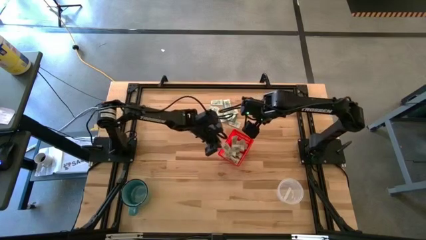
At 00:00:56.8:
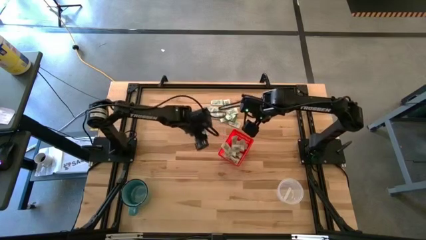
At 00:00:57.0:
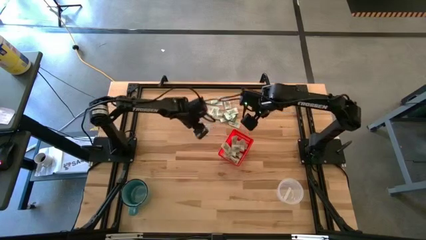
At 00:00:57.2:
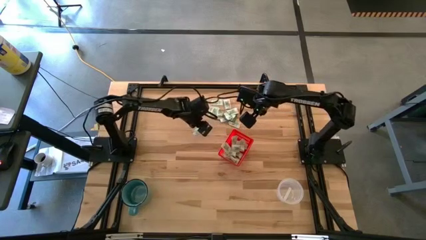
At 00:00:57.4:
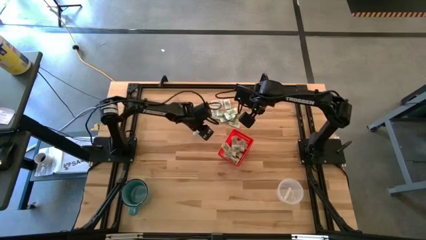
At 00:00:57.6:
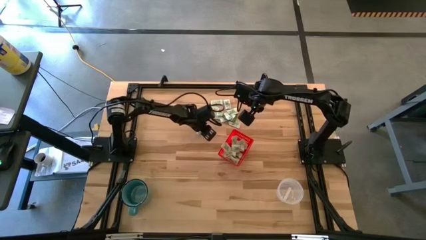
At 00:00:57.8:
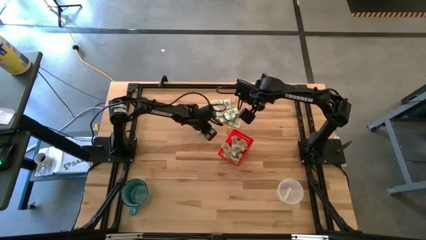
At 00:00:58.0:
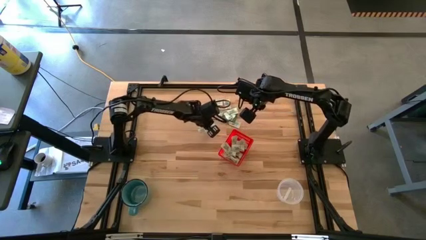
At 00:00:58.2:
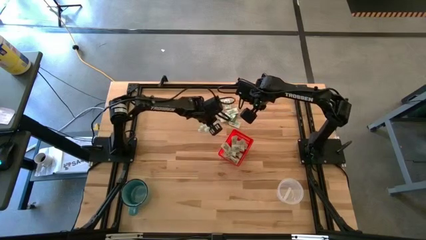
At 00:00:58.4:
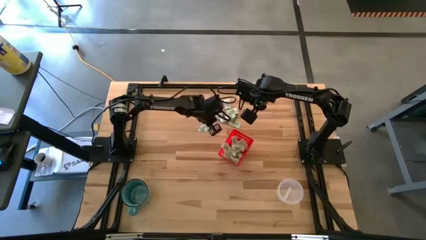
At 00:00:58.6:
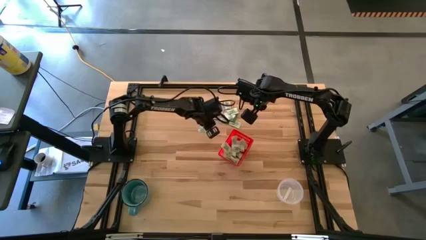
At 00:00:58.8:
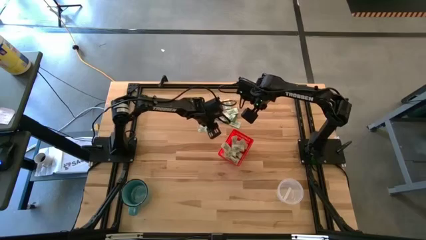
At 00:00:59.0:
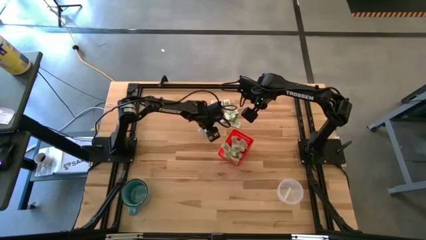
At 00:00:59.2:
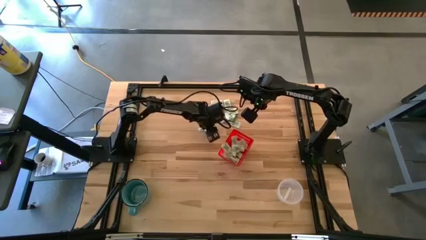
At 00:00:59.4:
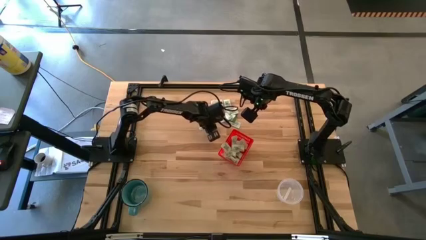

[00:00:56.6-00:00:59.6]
Task: Pick and place items into bin
Put the white stevia packet into the bin

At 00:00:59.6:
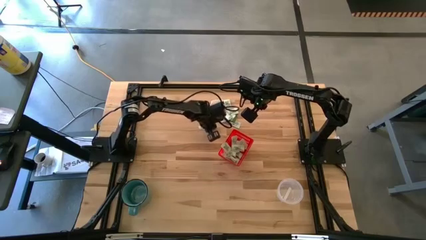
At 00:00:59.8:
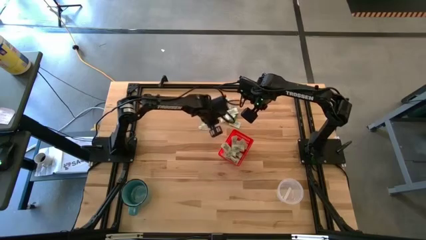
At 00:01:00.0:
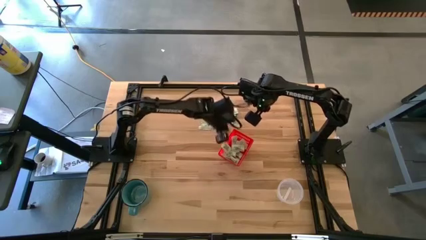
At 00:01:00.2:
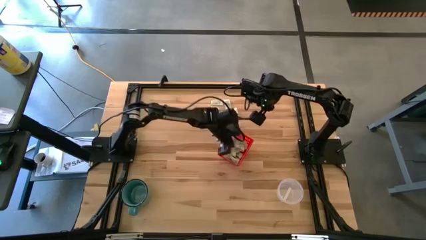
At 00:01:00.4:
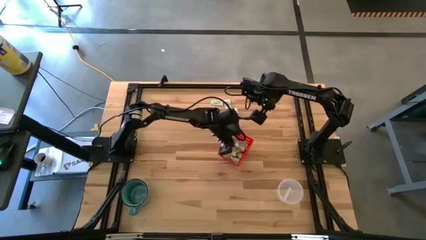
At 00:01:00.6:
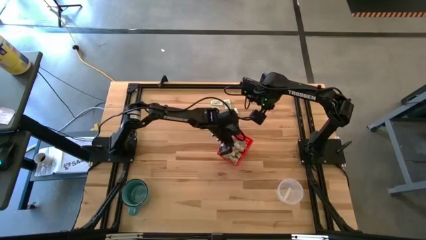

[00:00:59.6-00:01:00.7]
Put the white stevia packet into the bin

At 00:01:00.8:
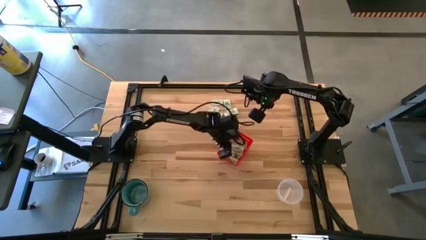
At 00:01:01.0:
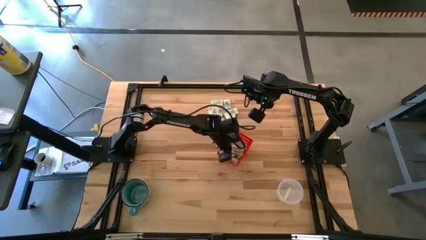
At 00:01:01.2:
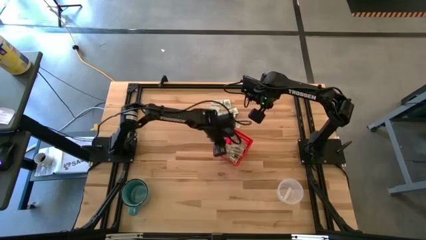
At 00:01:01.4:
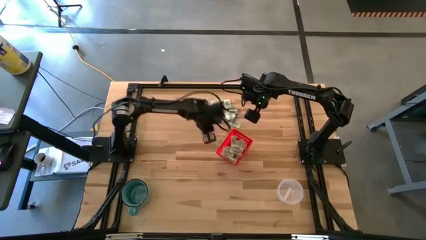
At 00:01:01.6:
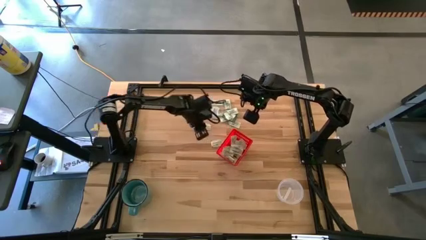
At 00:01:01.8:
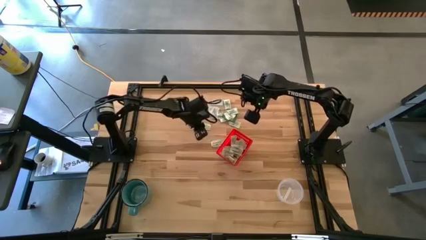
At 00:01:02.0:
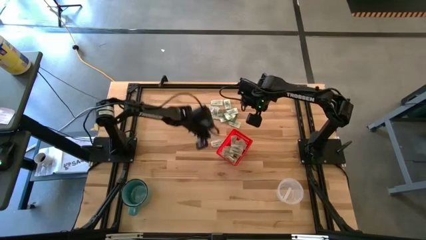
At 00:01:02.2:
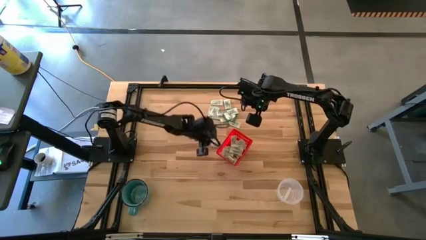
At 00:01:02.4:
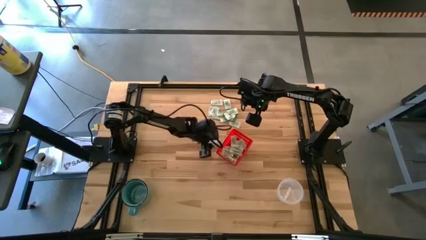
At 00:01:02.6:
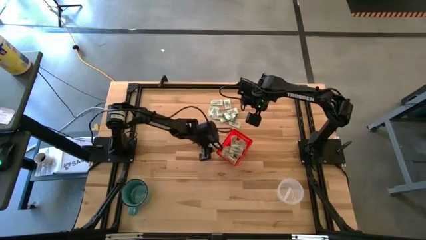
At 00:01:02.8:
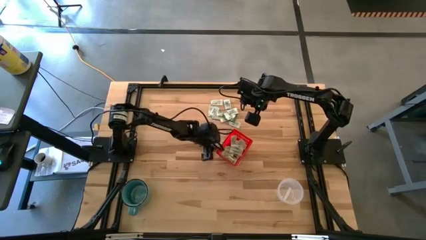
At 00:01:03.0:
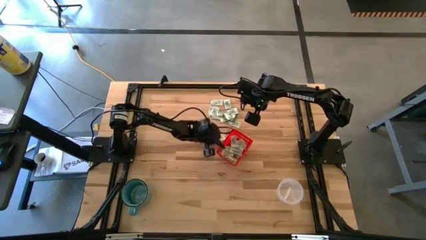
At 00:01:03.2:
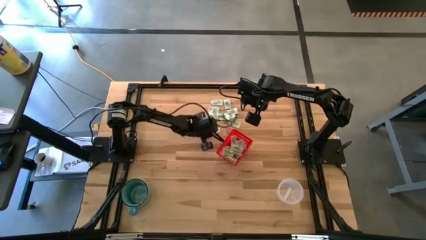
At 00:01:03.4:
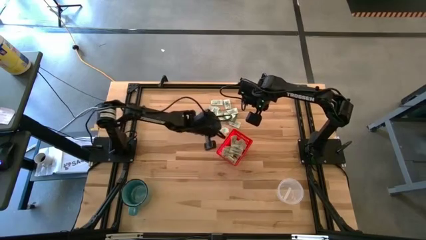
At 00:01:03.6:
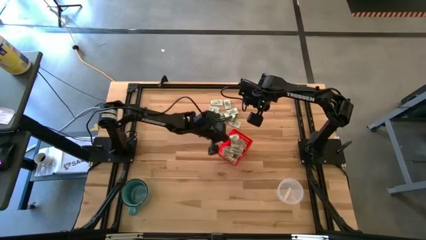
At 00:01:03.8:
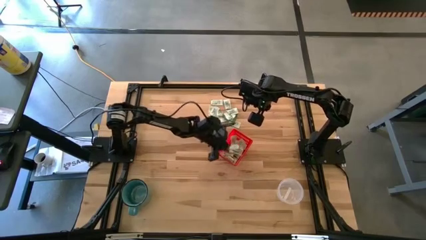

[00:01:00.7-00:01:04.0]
Put the white stevia packet into the bin

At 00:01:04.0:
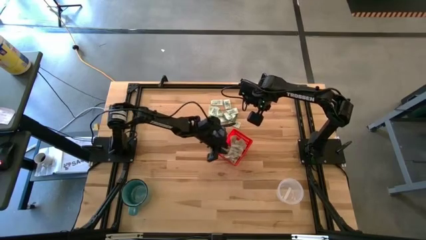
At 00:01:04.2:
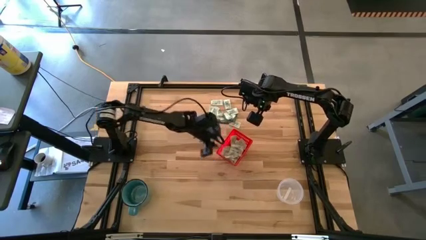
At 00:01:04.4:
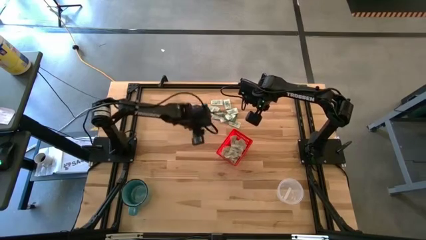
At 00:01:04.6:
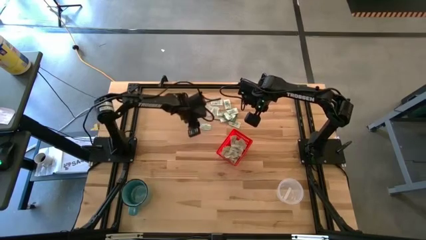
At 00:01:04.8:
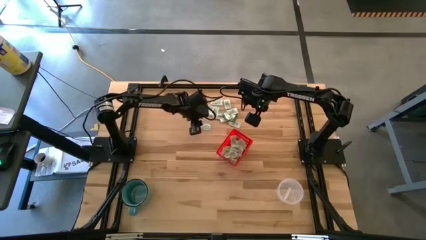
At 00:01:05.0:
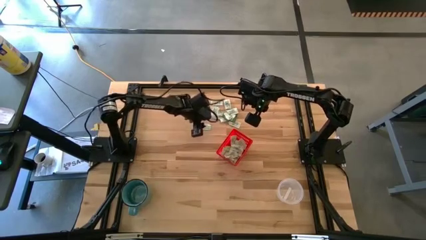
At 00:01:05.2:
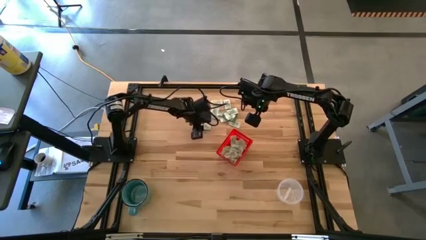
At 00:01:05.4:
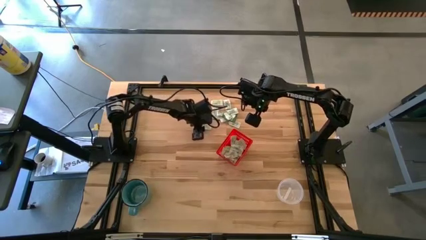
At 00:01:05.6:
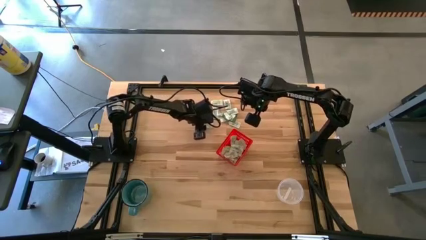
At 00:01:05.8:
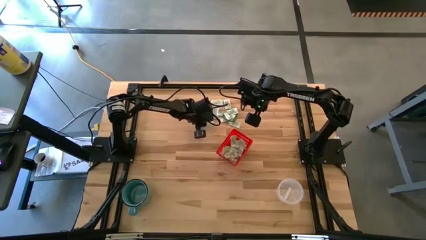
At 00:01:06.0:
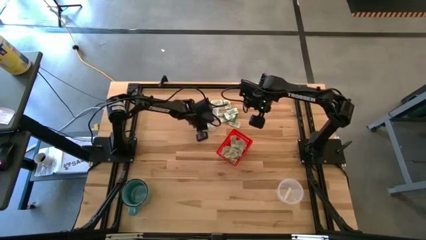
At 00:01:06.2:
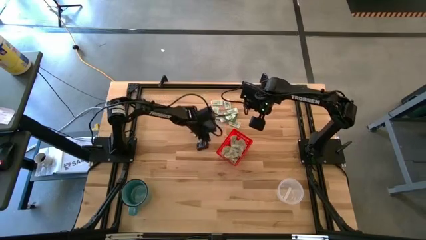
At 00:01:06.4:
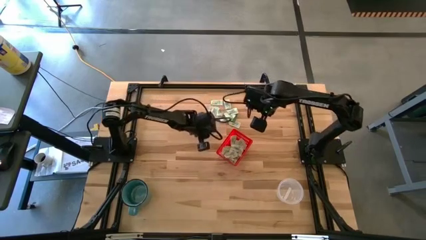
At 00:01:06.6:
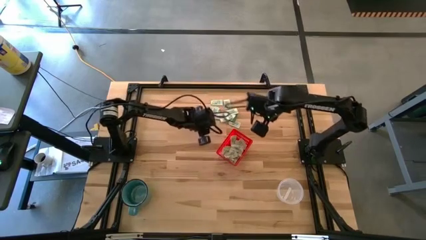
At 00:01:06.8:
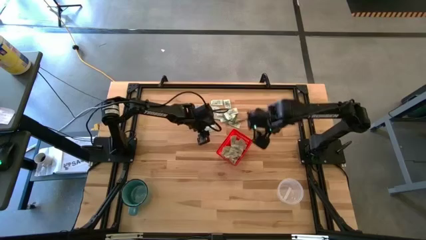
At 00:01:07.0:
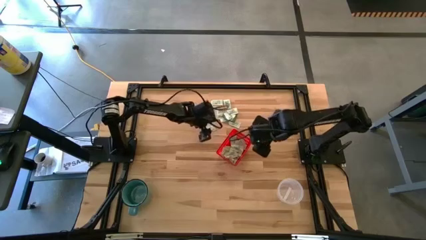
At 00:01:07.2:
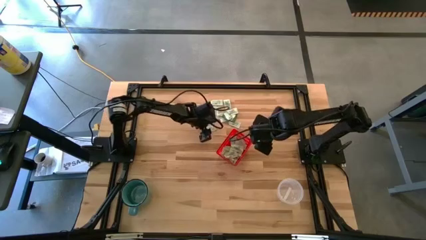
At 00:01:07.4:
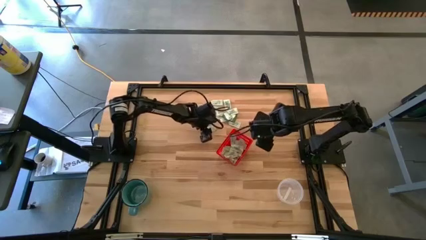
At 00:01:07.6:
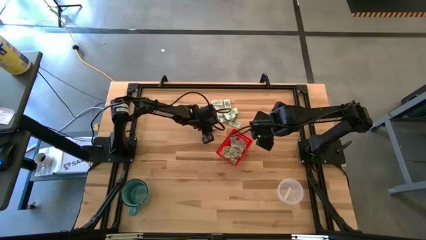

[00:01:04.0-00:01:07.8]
Put the white stevia packet into the bin

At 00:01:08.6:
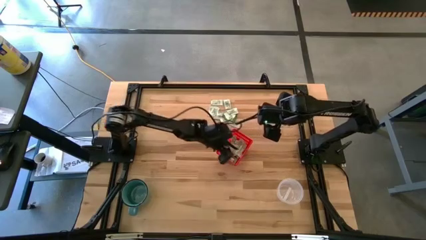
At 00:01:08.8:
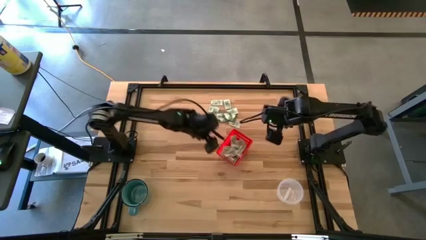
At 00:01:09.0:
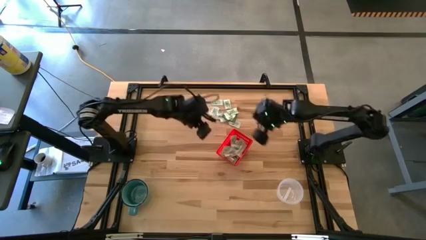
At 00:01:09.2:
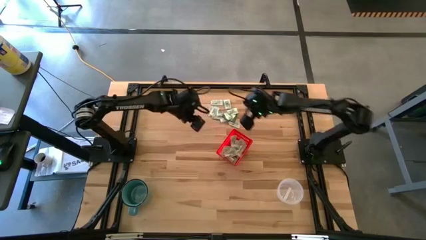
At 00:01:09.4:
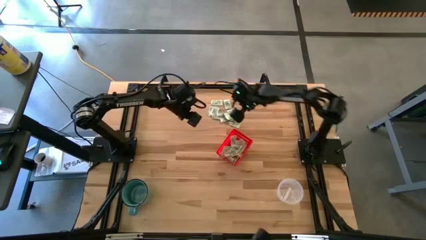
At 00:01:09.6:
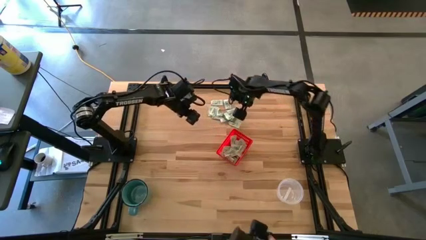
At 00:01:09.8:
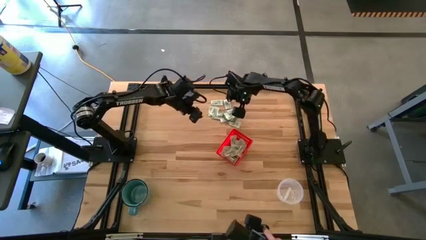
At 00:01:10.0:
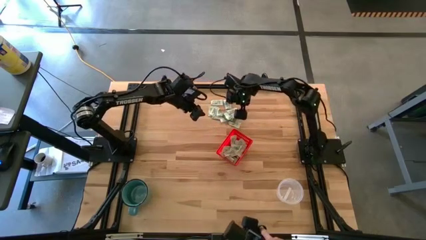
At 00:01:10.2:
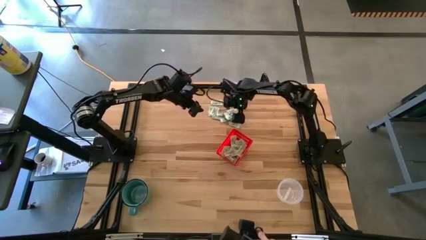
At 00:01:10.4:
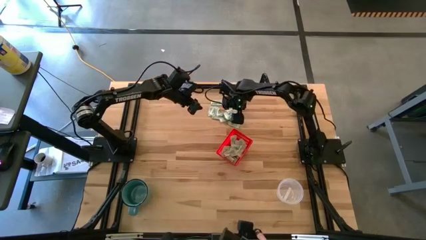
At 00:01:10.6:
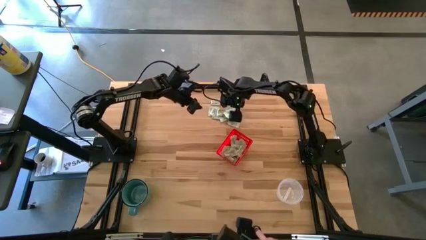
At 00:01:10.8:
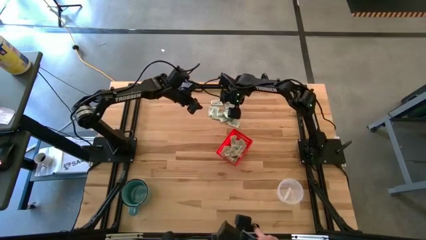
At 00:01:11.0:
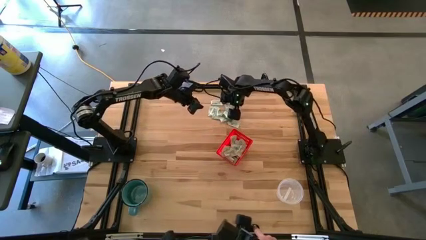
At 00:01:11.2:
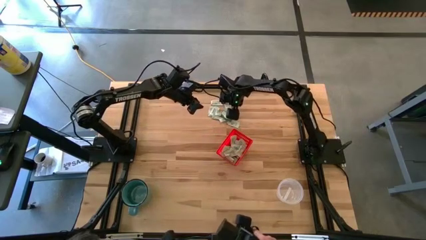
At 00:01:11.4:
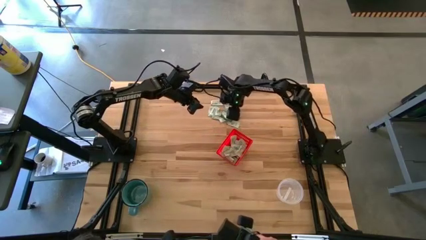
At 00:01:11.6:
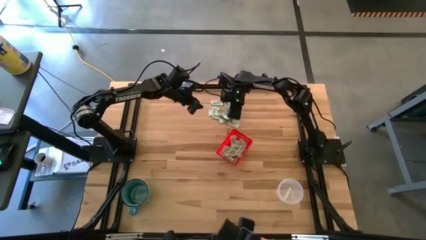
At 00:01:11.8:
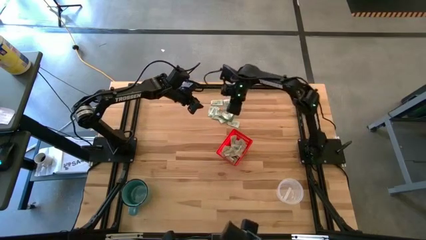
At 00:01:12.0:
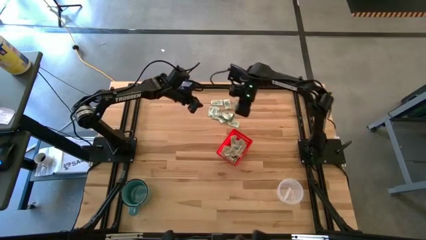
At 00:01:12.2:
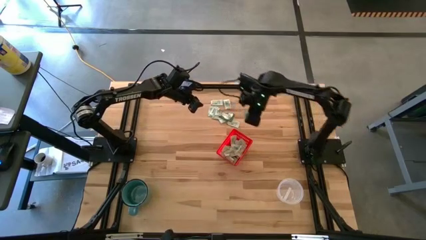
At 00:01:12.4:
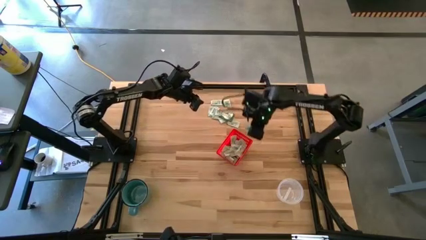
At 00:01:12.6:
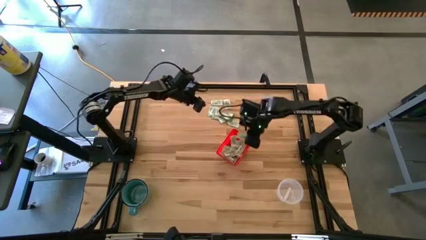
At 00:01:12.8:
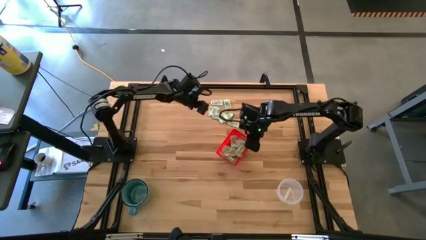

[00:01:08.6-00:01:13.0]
Put the white stevia packet into the bin

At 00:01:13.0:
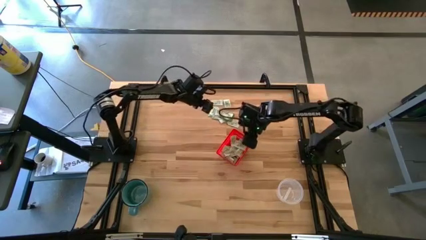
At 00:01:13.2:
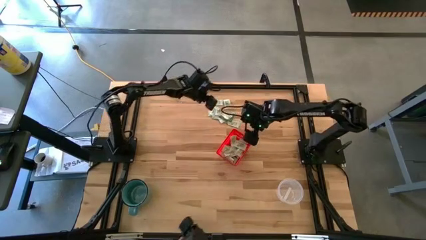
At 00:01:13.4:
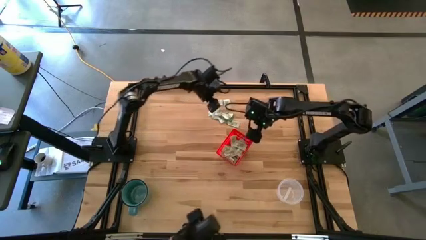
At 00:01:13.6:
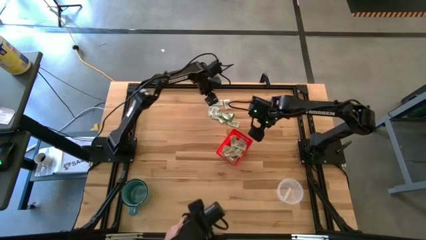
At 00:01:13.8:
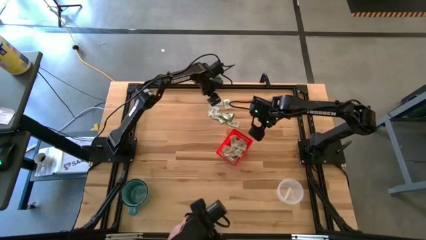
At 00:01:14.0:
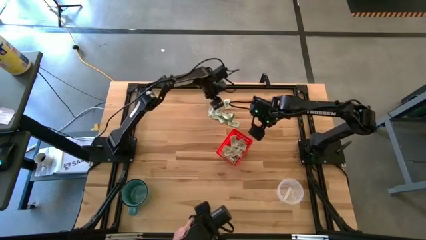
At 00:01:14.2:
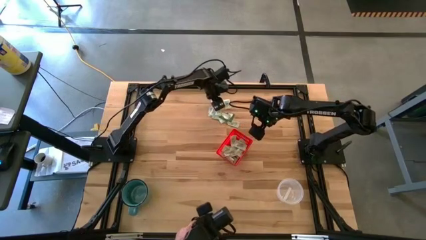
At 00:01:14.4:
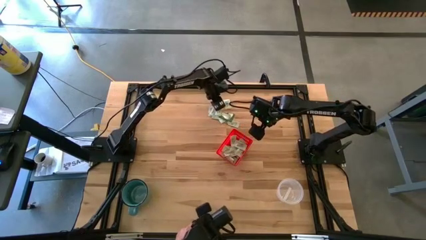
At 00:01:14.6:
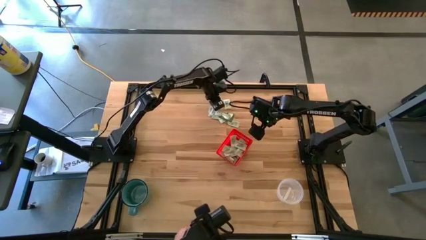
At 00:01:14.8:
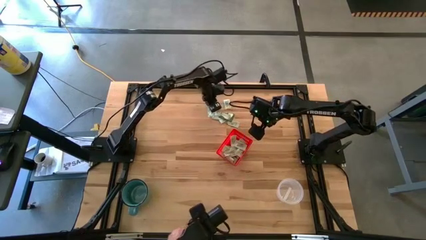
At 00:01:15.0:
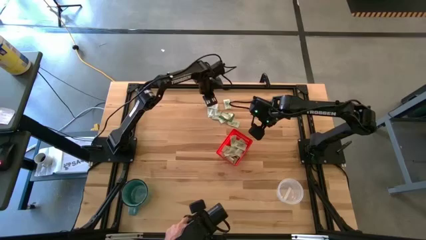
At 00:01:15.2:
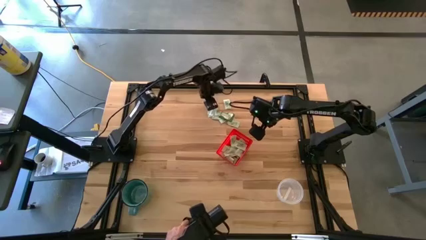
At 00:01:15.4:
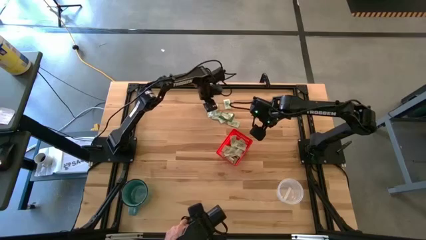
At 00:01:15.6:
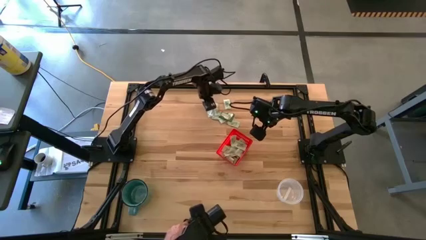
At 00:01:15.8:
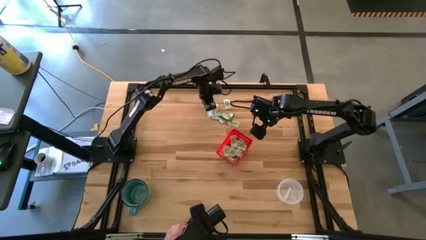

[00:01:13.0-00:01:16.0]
Put the white stevia packet into the bin
